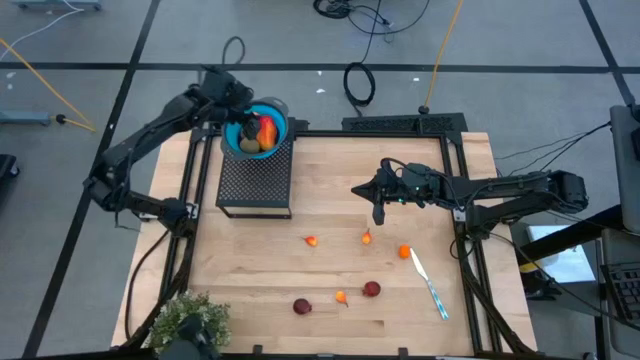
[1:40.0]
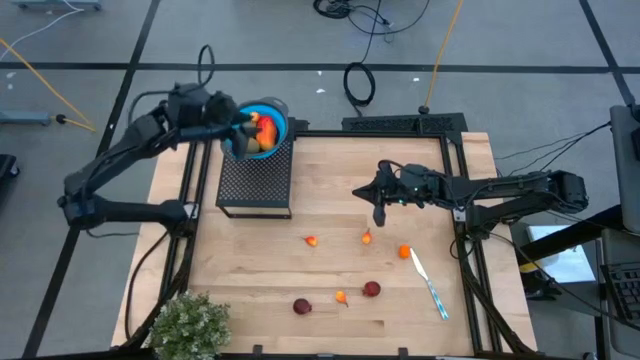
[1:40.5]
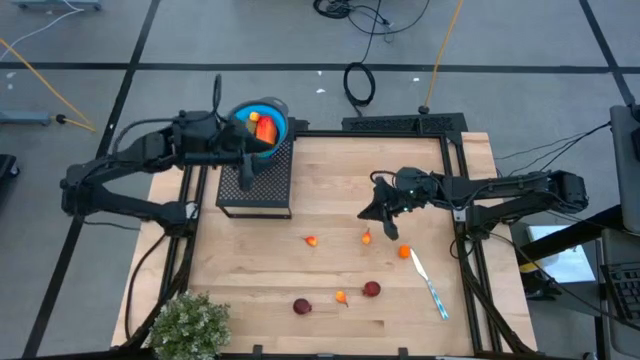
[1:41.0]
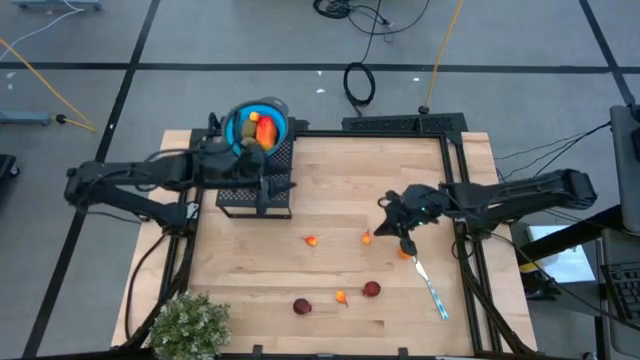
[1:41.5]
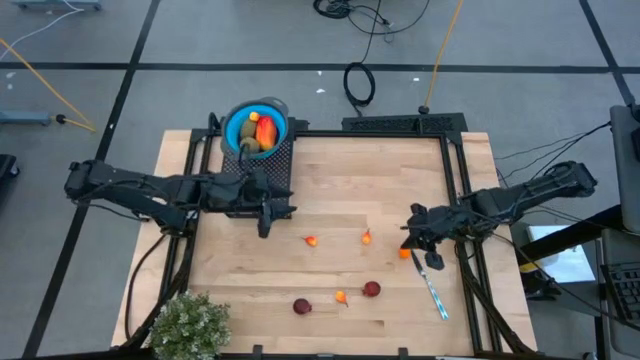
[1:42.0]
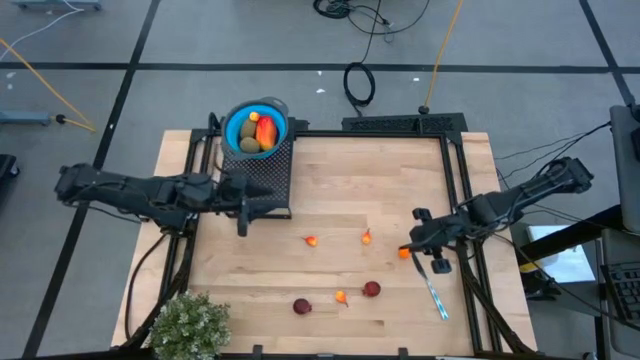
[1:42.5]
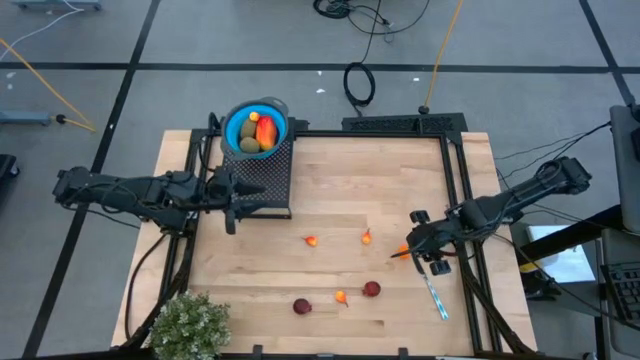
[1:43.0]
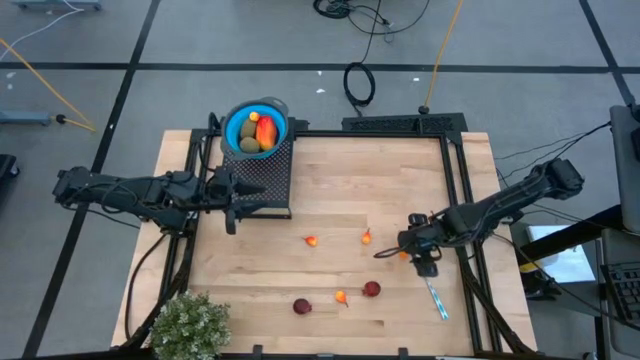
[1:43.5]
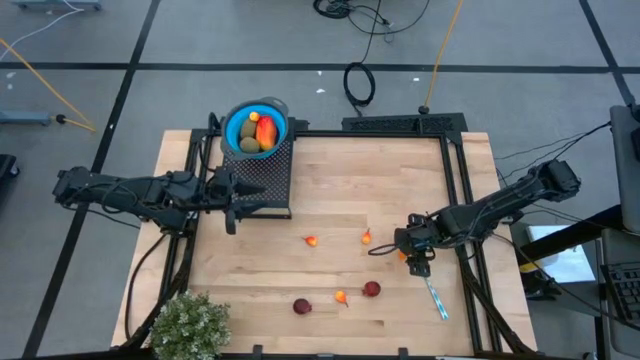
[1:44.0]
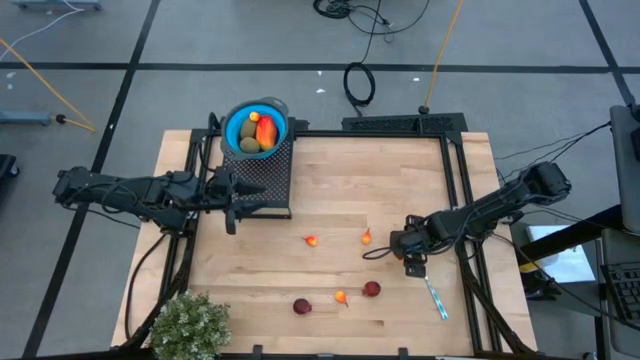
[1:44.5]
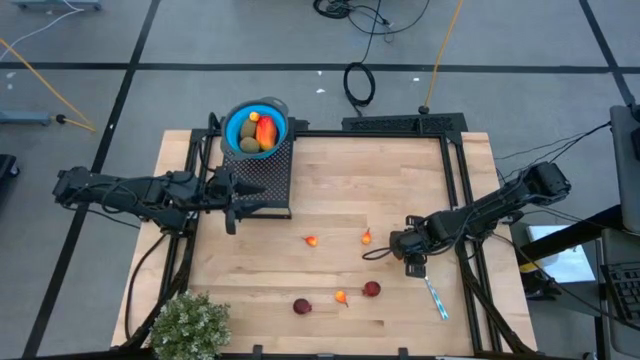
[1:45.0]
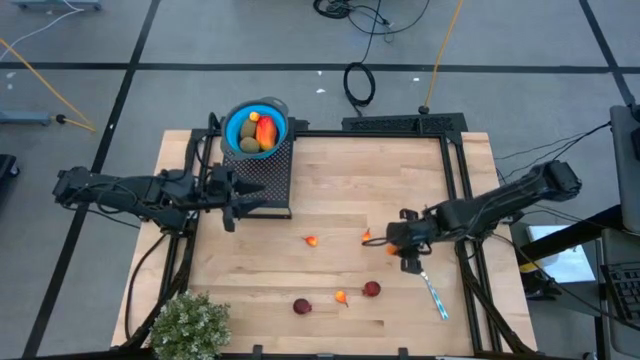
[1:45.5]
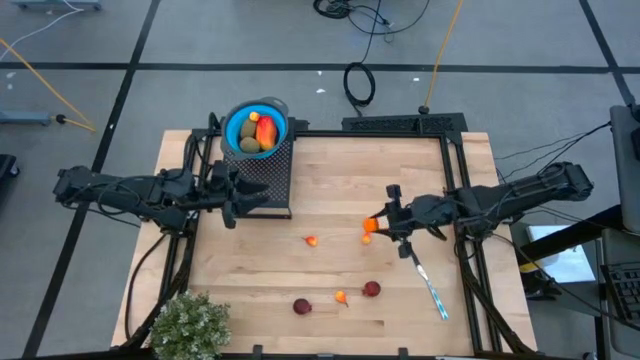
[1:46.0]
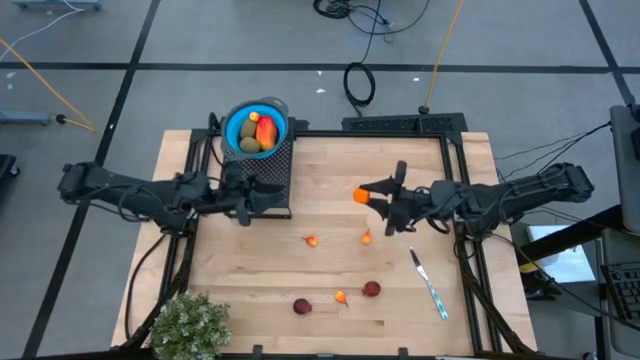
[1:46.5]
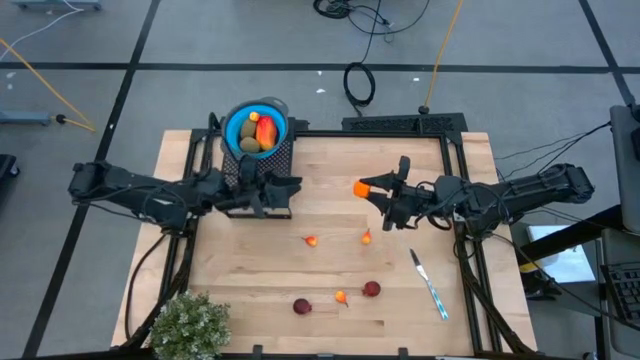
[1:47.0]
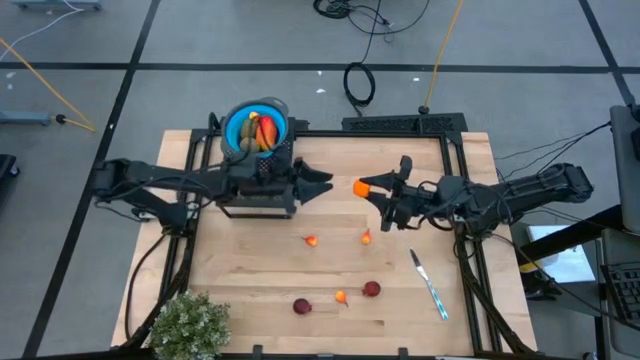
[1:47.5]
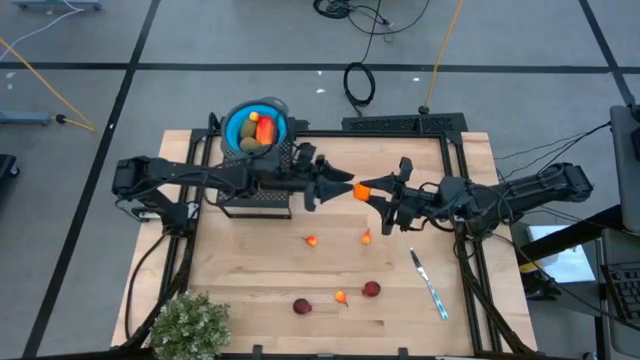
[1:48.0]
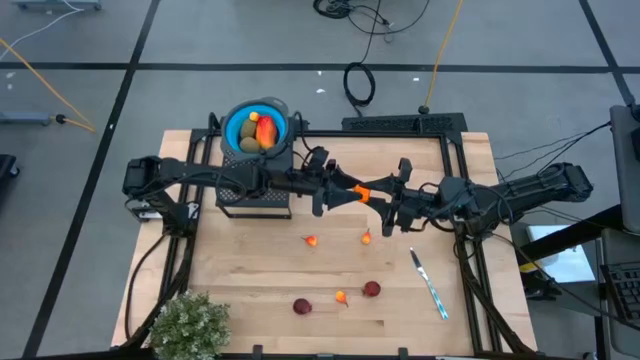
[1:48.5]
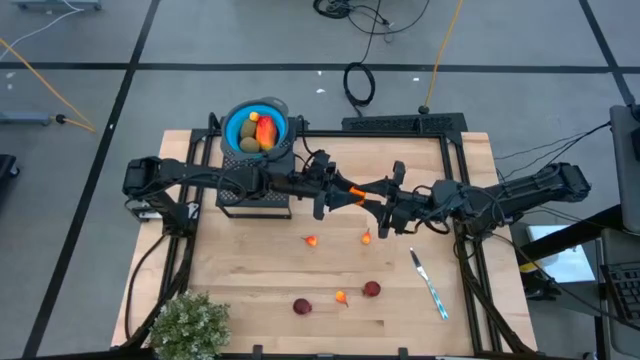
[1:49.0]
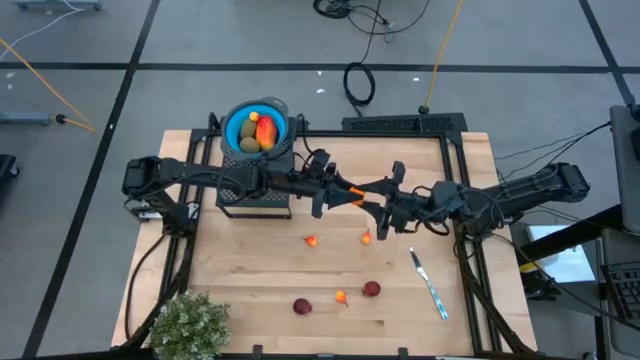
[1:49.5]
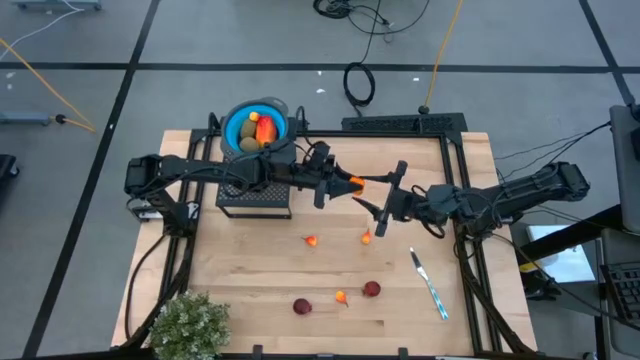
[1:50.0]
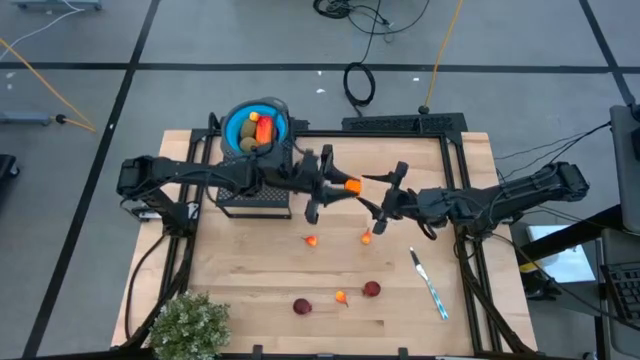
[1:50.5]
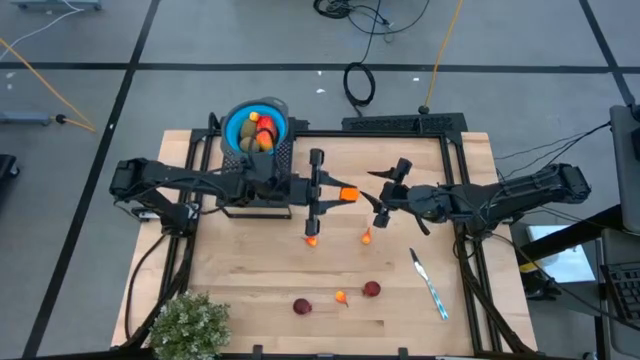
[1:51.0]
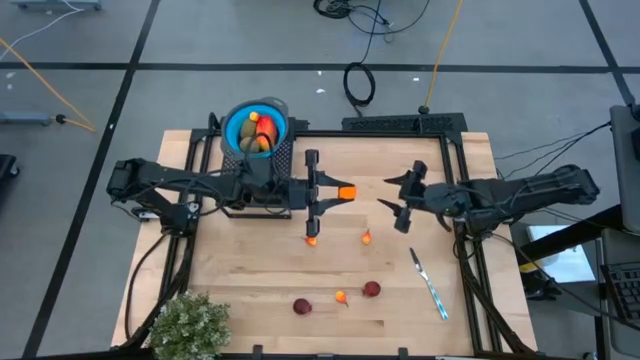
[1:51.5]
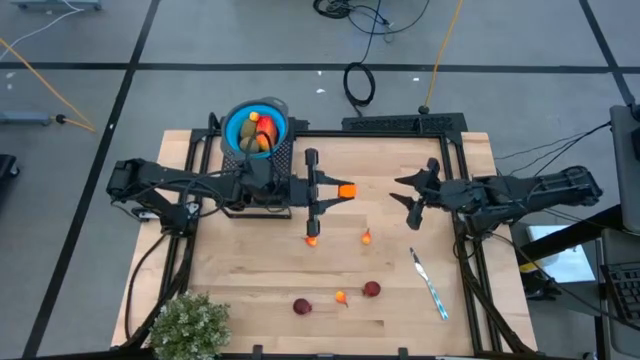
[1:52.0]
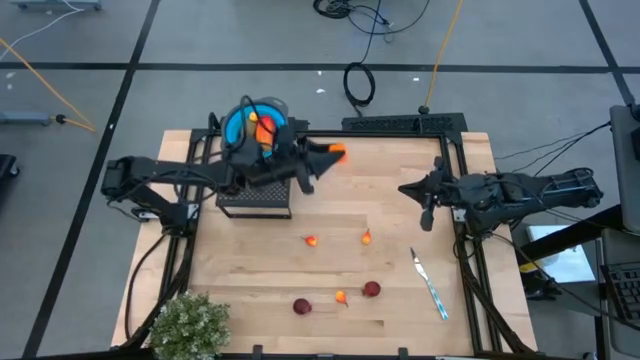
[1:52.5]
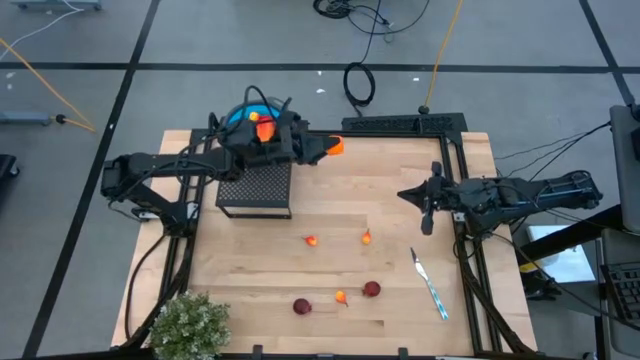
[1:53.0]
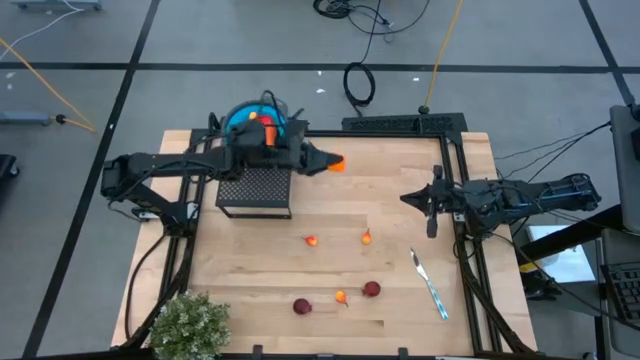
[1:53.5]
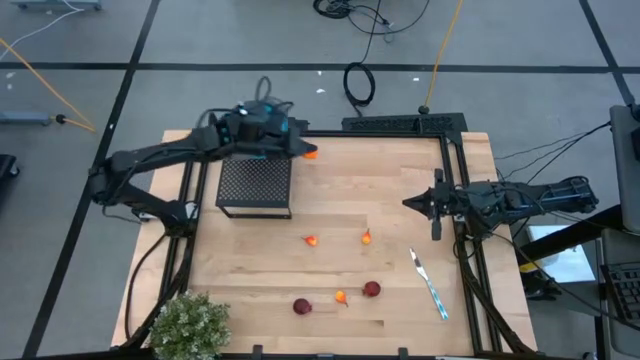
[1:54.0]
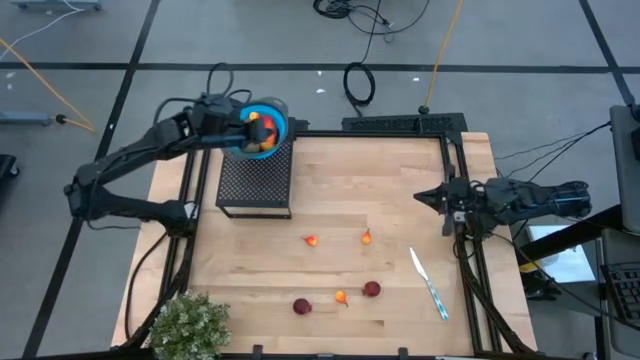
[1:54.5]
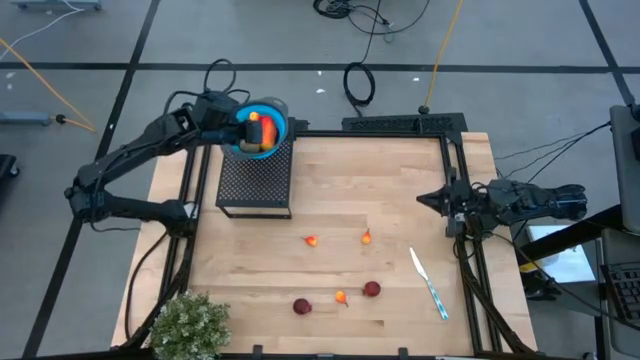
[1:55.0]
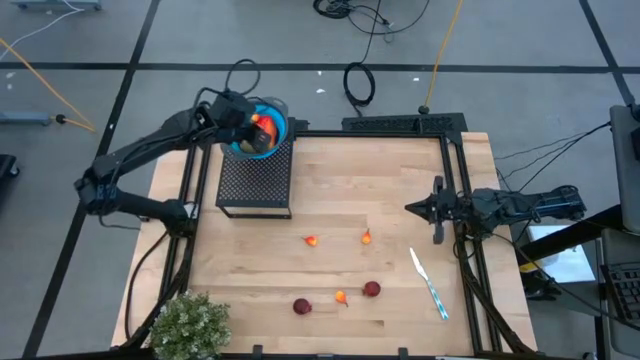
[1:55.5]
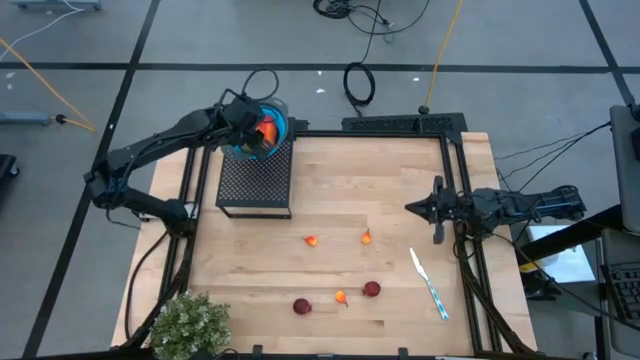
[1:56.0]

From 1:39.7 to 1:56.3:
Task: Pick & Place Fruit
Put the orange into the blue strainer bowl on the shelf

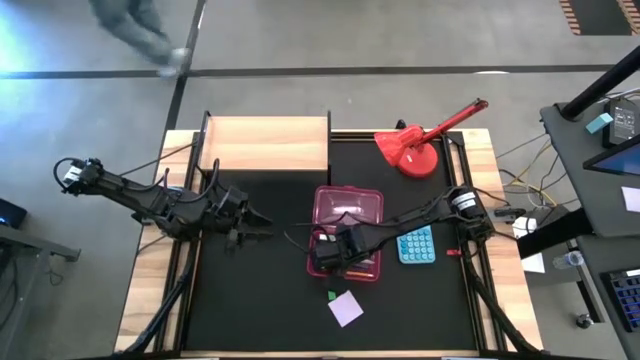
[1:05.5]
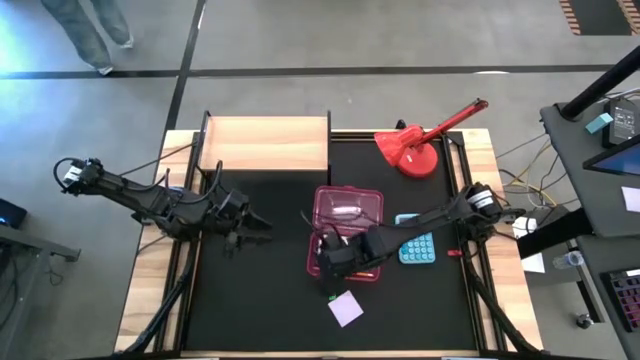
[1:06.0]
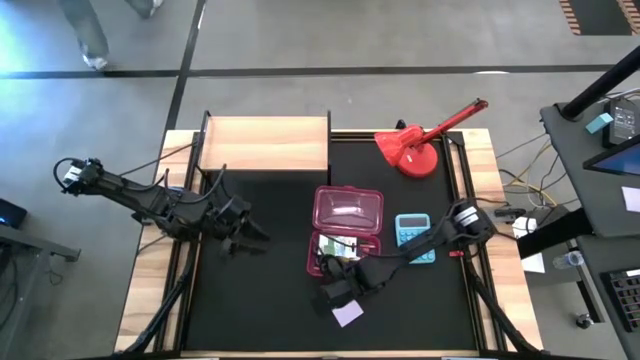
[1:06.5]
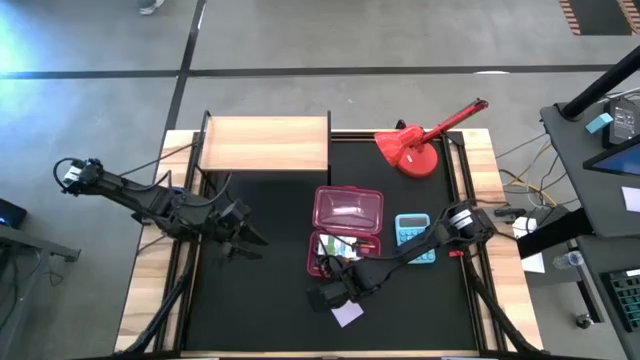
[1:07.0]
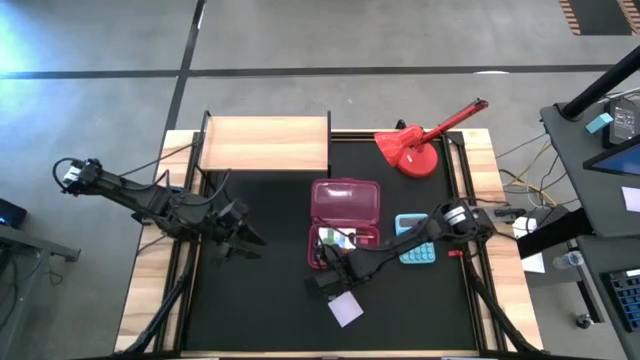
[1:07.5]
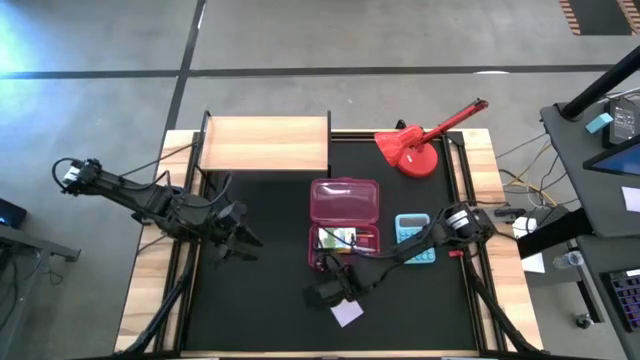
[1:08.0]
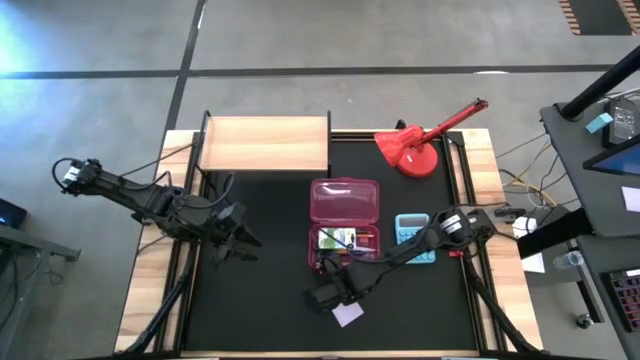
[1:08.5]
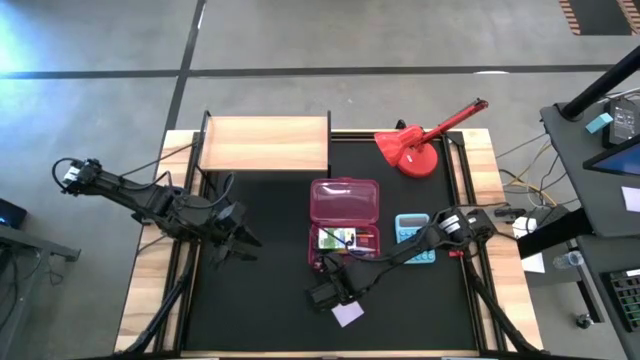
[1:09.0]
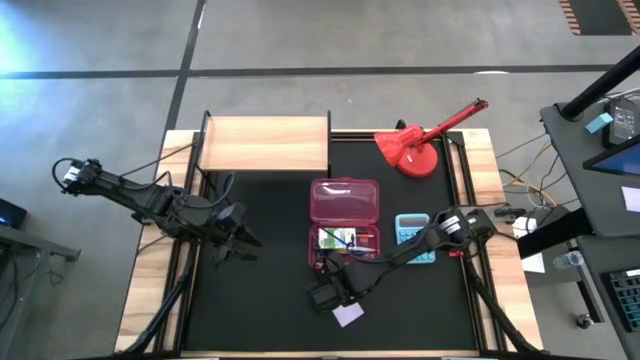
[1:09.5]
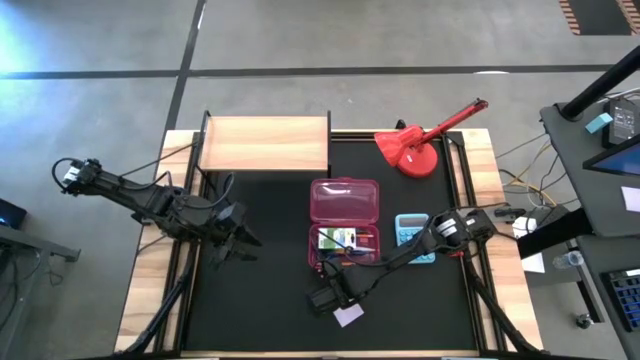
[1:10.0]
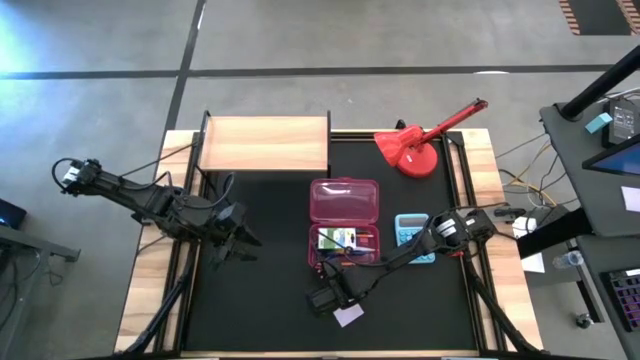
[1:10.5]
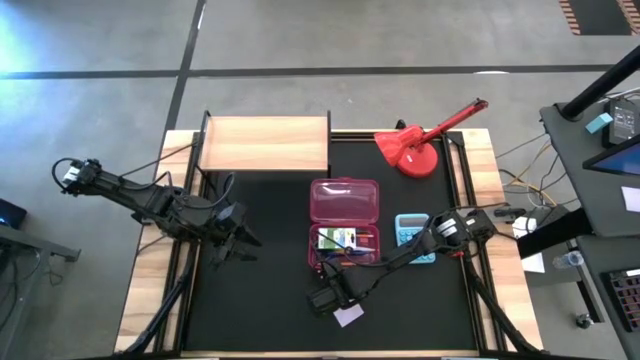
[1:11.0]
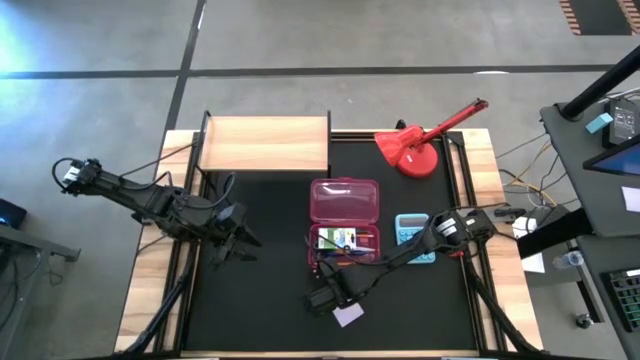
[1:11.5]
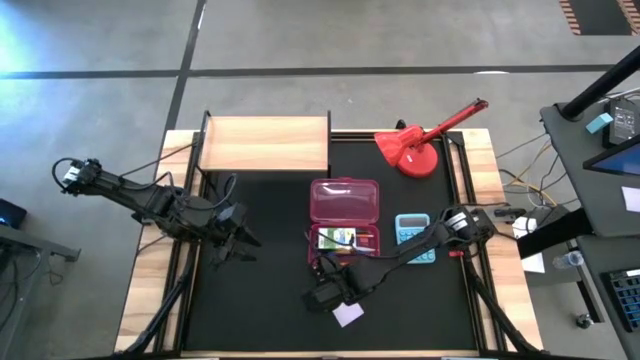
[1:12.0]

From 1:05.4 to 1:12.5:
Task: Pack school essentials
Put the green eraser into the pink supply box
